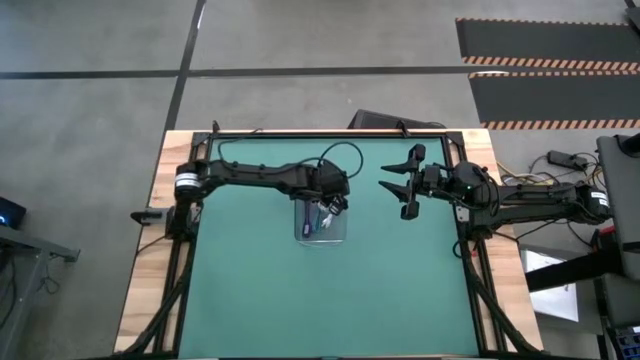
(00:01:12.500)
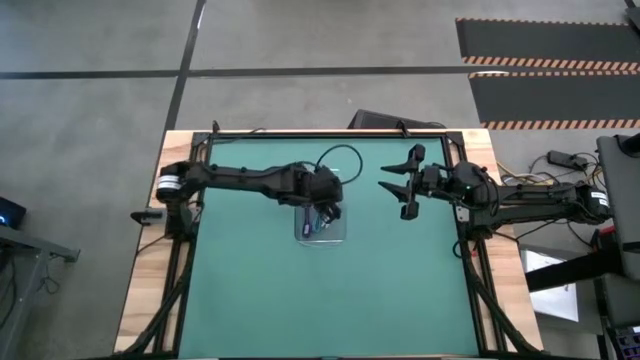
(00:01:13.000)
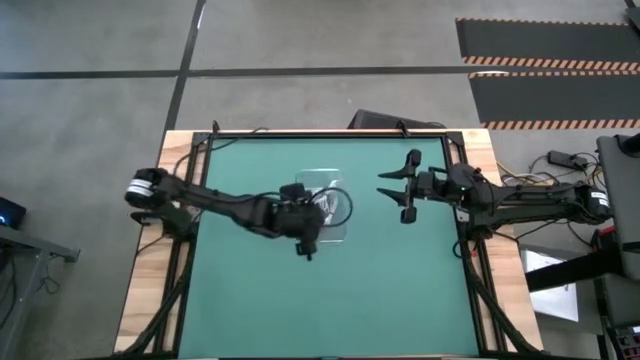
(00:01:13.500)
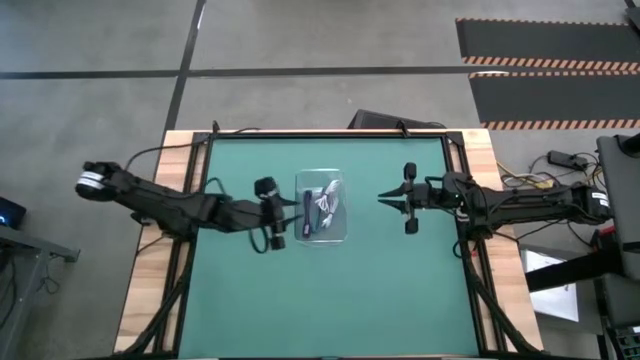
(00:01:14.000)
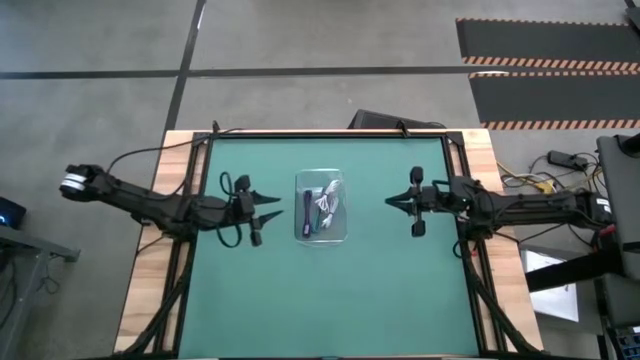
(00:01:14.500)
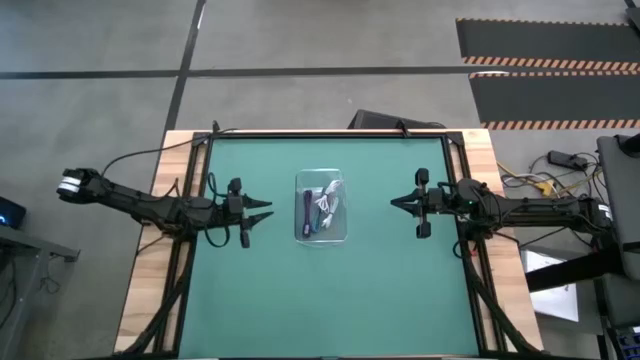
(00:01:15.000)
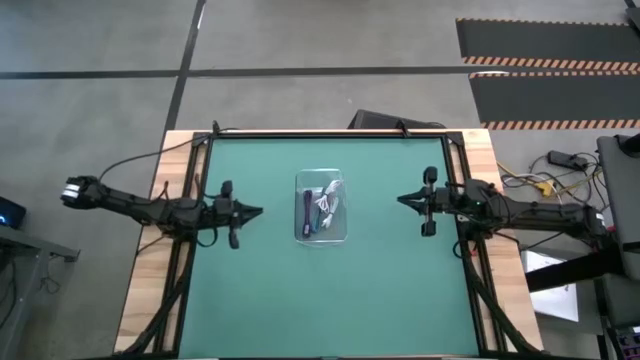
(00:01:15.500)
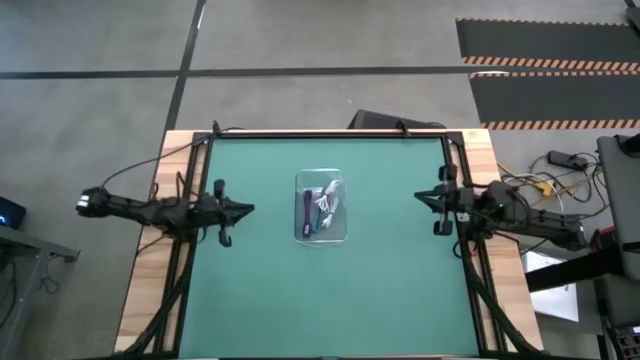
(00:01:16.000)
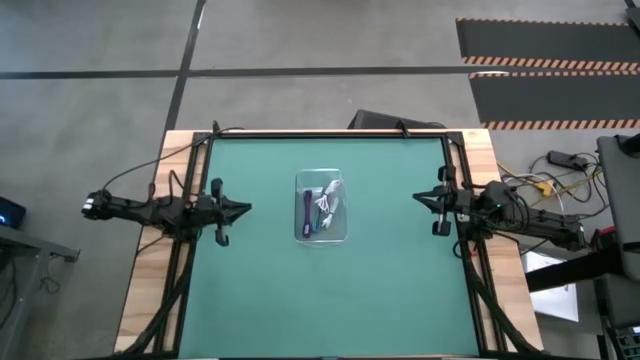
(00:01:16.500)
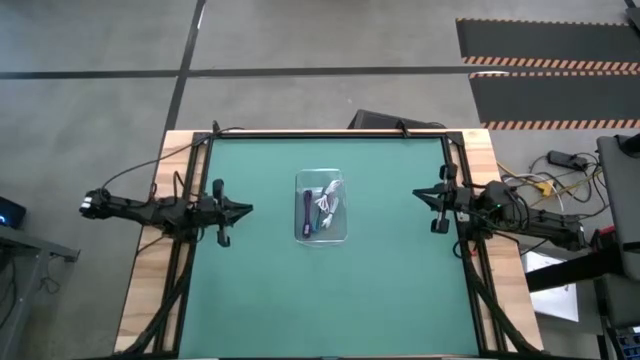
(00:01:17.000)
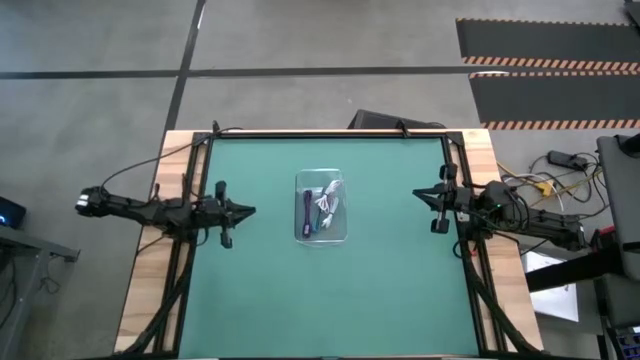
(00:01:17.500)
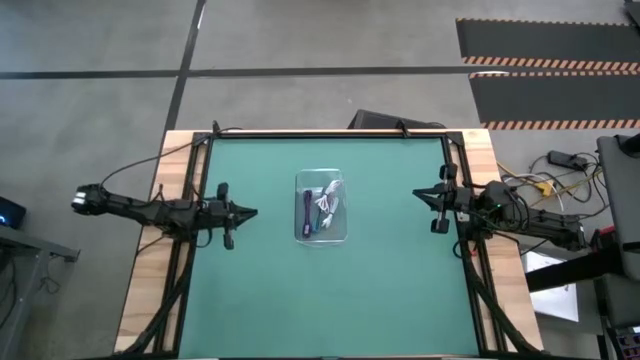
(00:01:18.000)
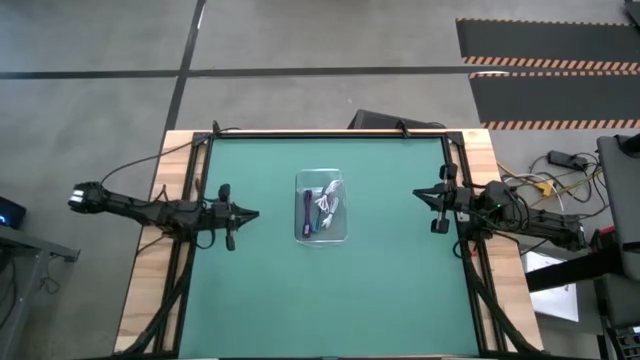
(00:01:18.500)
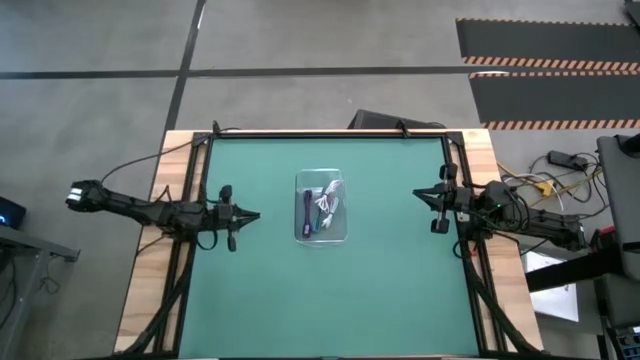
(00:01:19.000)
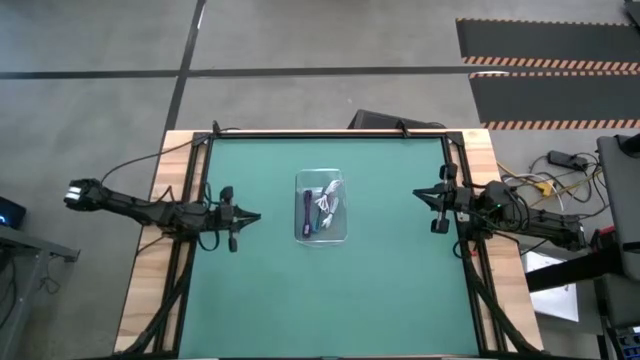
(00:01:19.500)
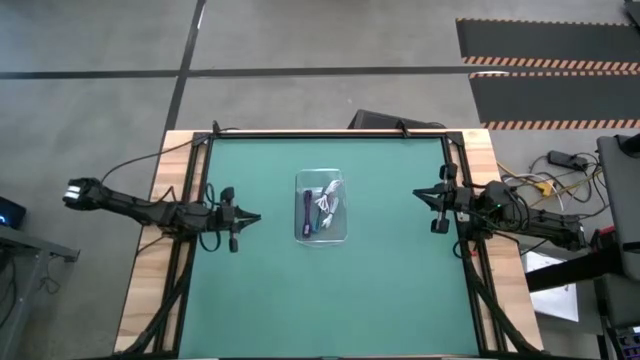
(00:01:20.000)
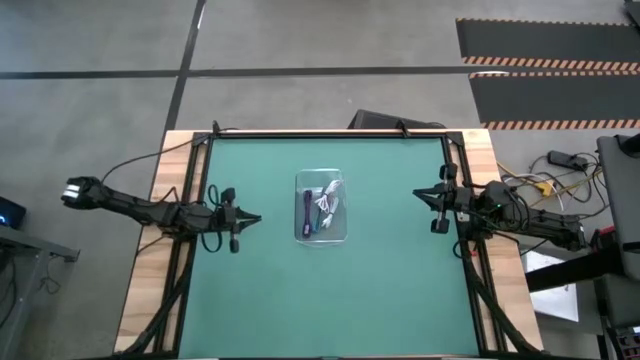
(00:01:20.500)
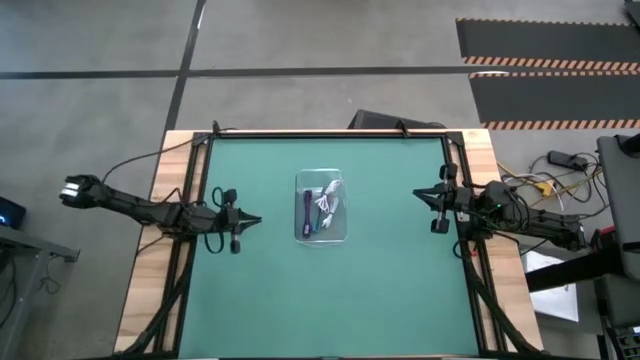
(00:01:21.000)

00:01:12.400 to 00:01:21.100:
Task: Pick and place USB-C Cables
Return to home position
